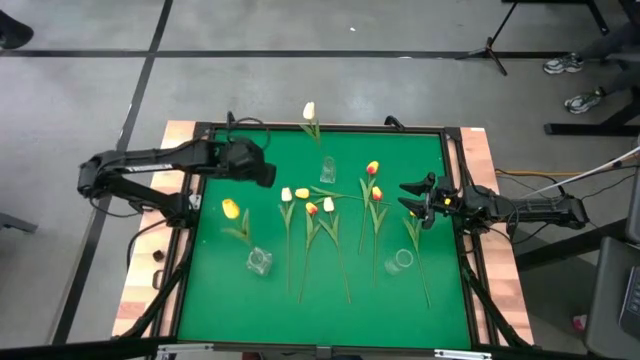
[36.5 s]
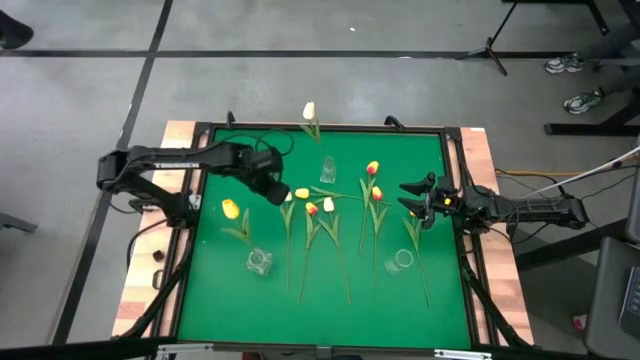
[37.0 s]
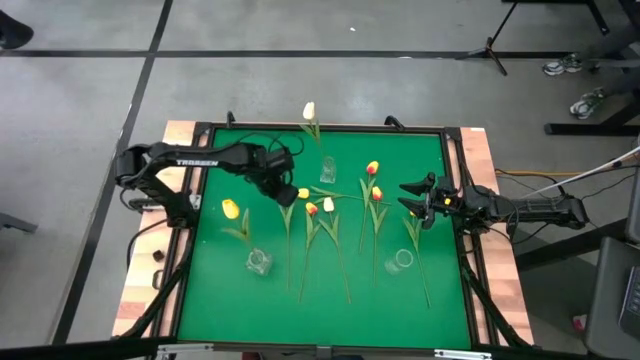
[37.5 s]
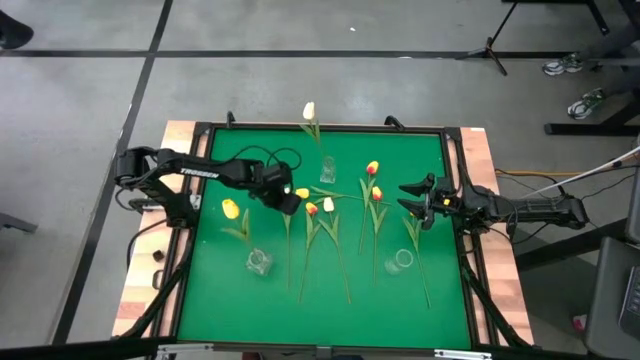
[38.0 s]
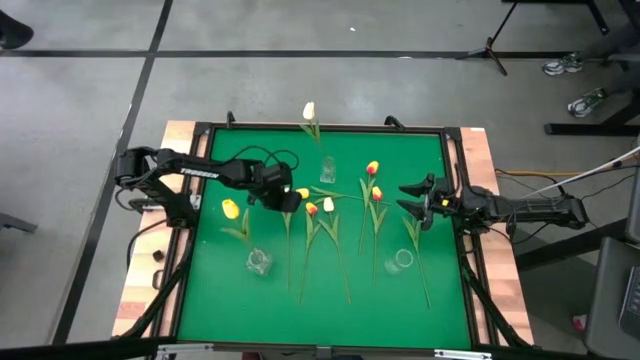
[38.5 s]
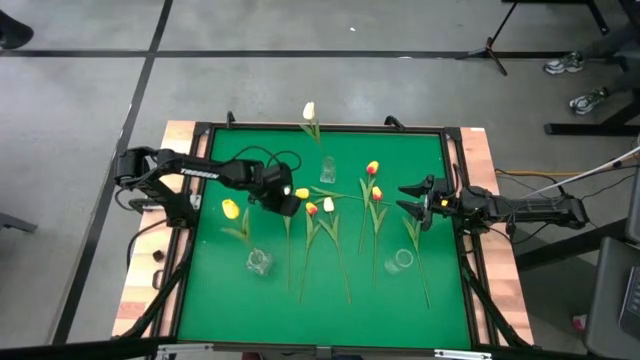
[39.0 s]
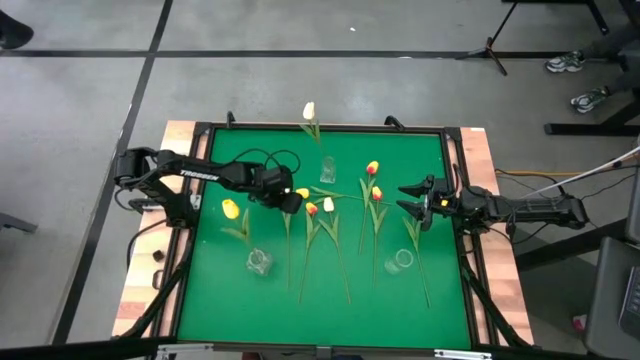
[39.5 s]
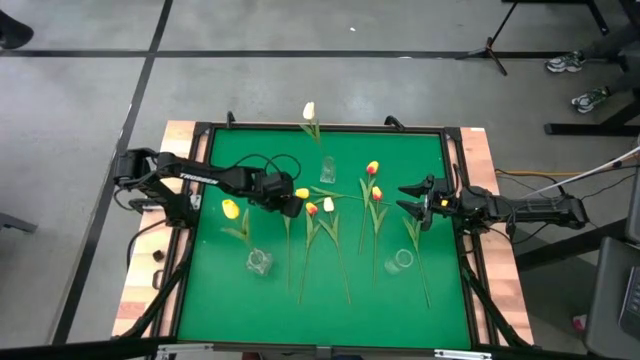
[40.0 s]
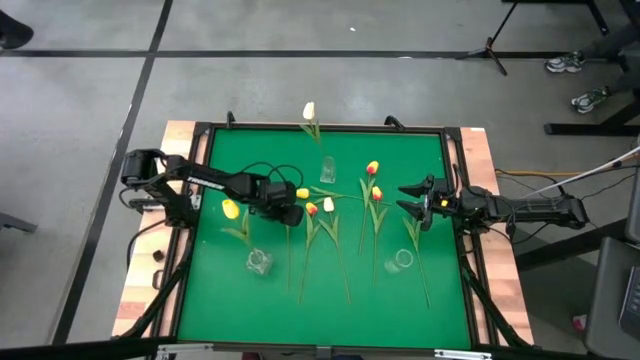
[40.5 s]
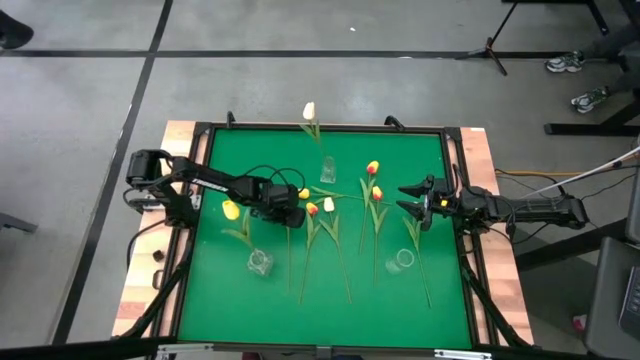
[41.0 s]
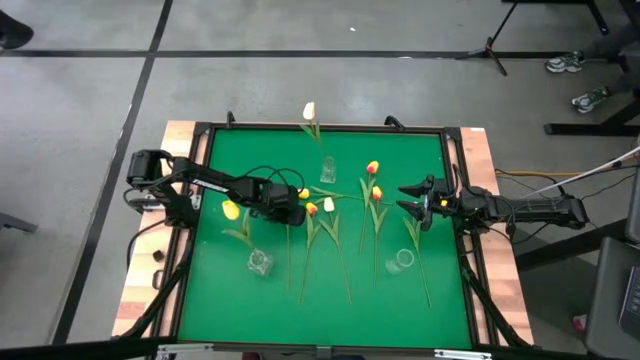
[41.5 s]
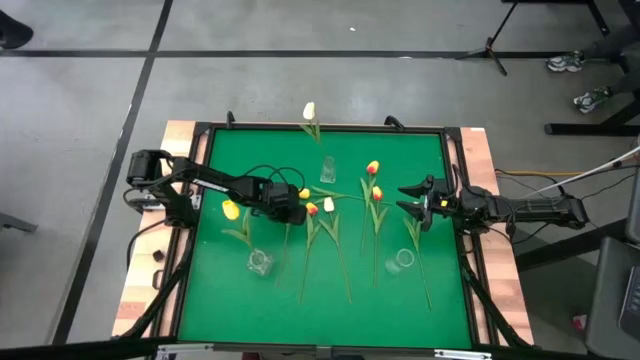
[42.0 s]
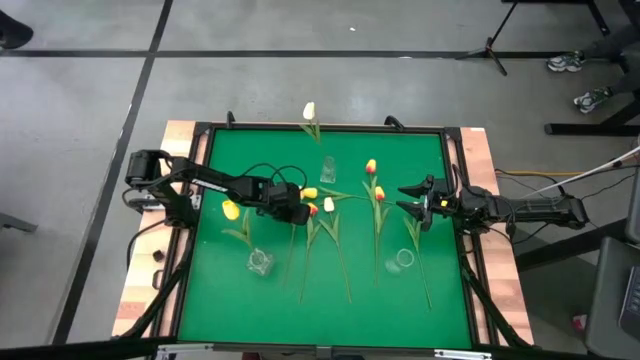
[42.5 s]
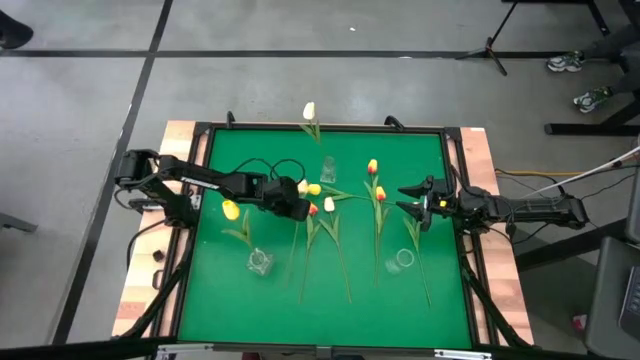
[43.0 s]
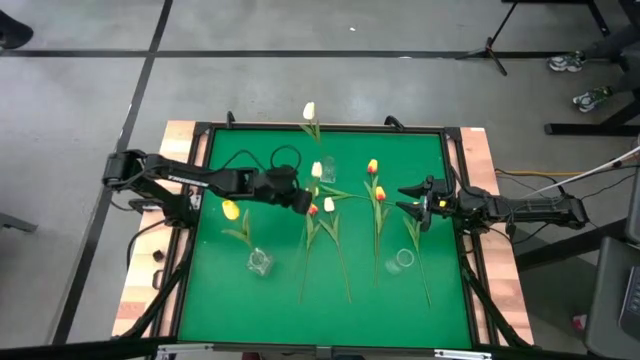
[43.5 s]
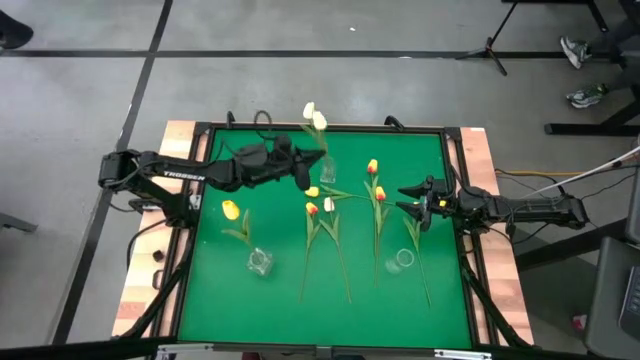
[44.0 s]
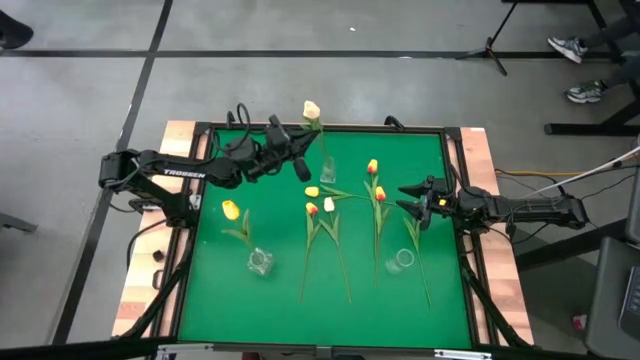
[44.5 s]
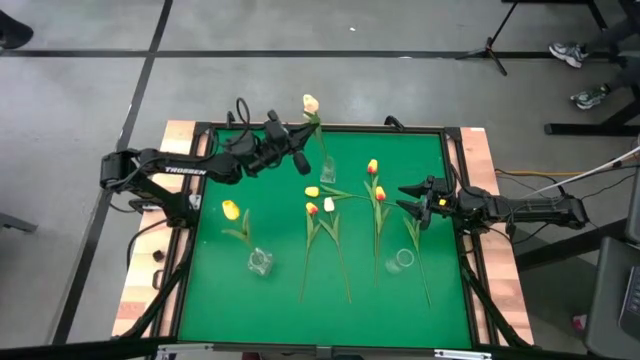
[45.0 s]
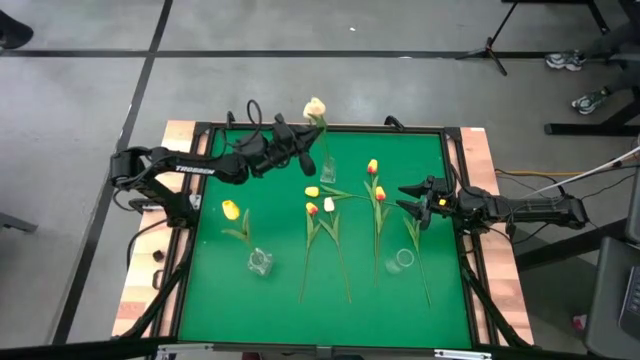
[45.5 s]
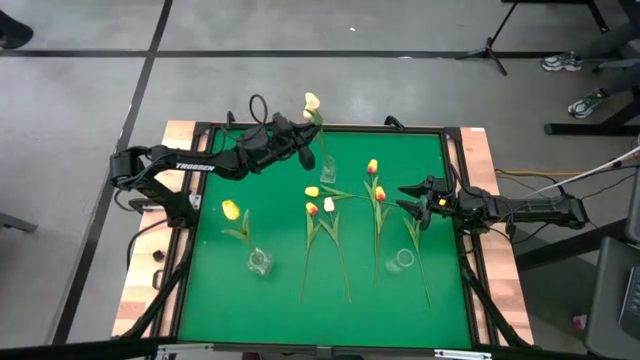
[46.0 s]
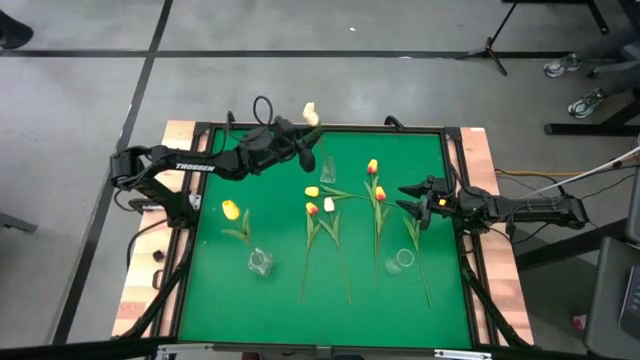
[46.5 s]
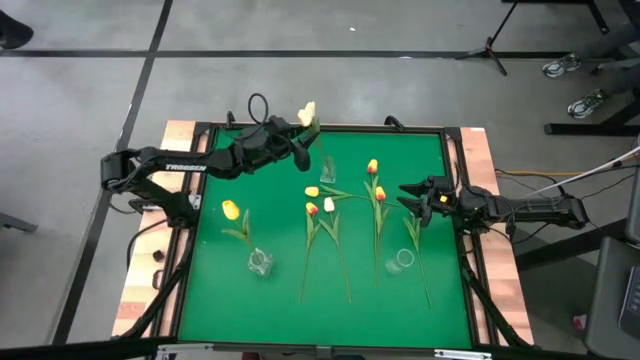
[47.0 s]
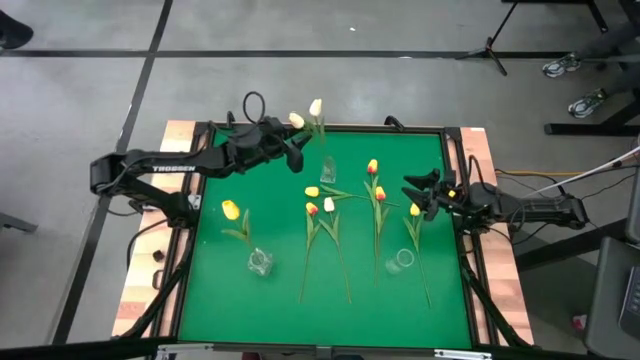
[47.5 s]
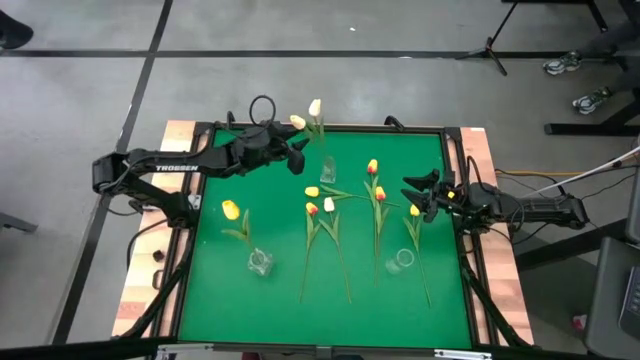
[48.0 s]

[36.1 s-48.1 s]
Task: Sort flowers into vase by color
Put the left white tulip into the top transparent vase

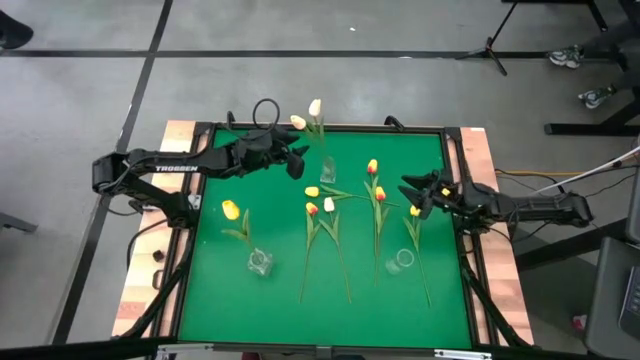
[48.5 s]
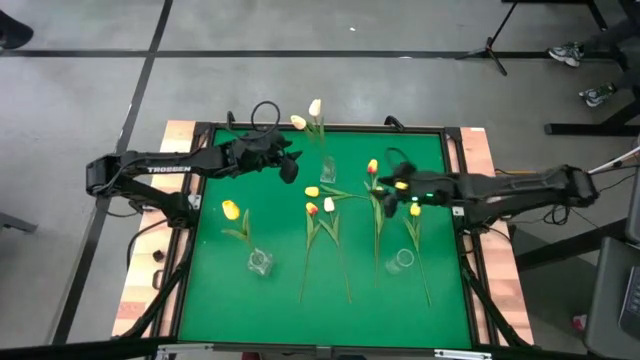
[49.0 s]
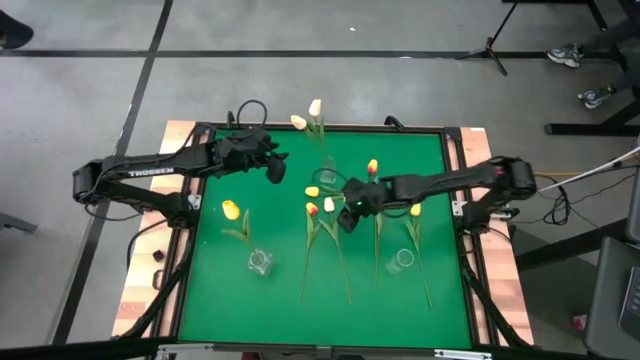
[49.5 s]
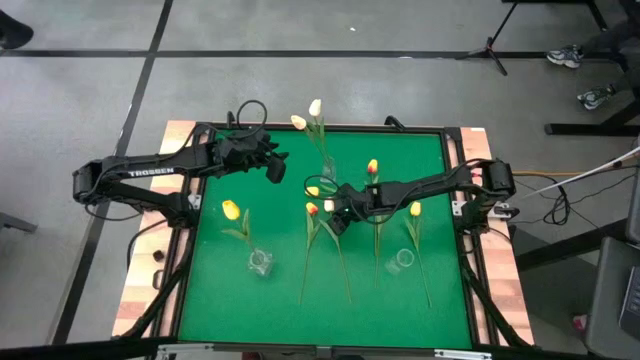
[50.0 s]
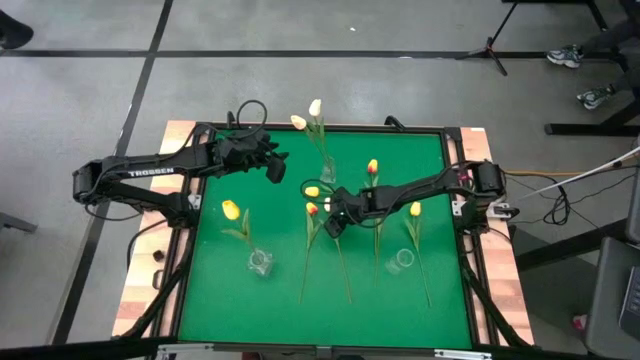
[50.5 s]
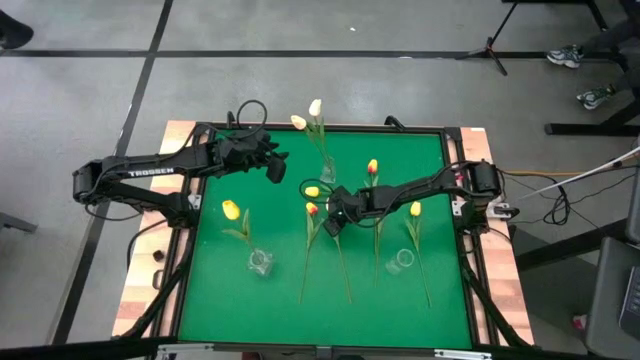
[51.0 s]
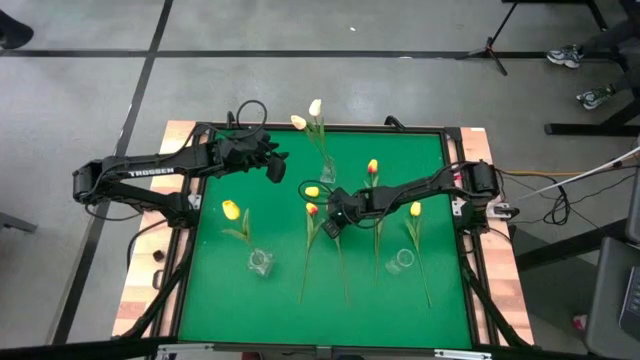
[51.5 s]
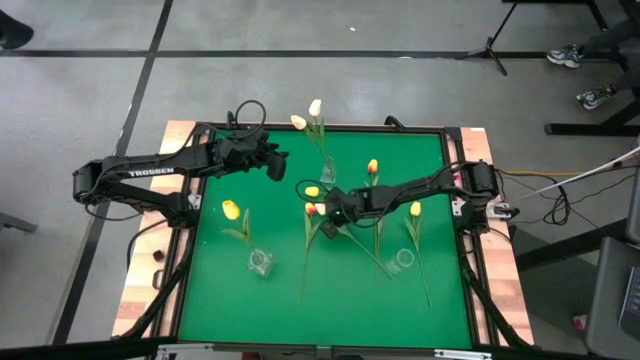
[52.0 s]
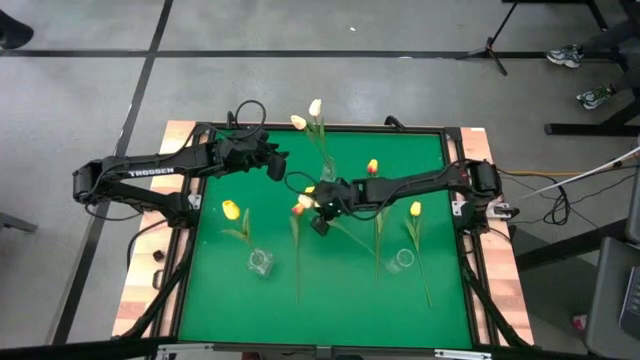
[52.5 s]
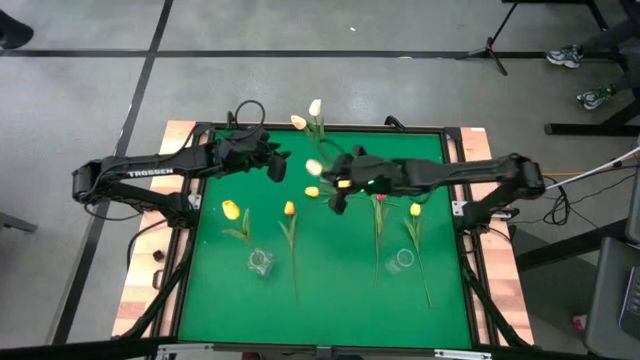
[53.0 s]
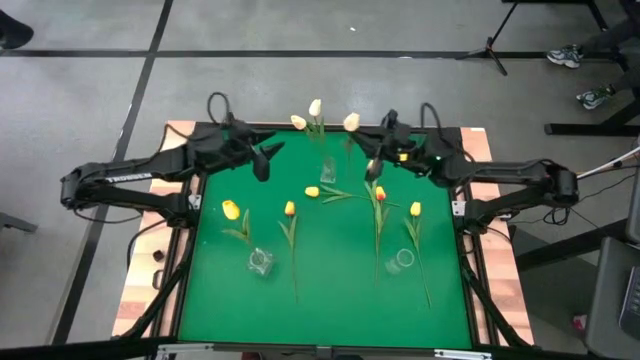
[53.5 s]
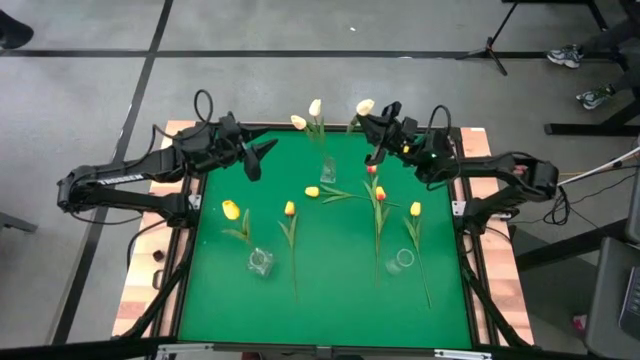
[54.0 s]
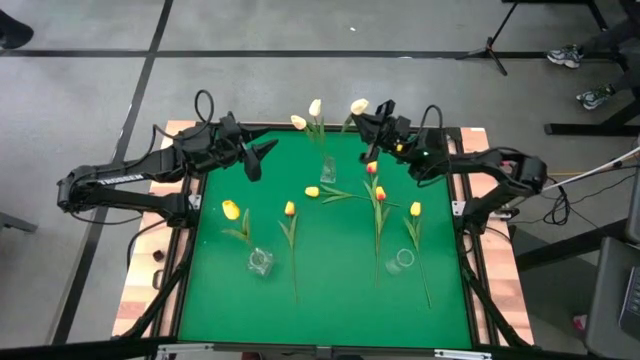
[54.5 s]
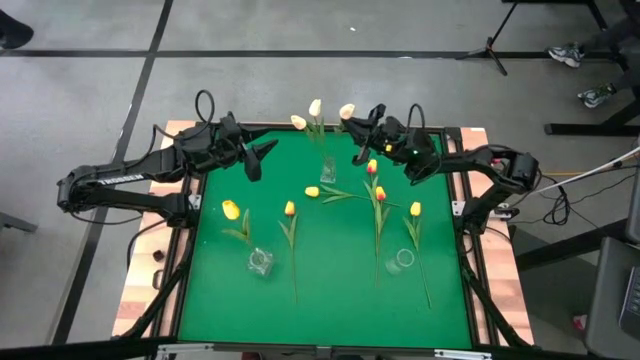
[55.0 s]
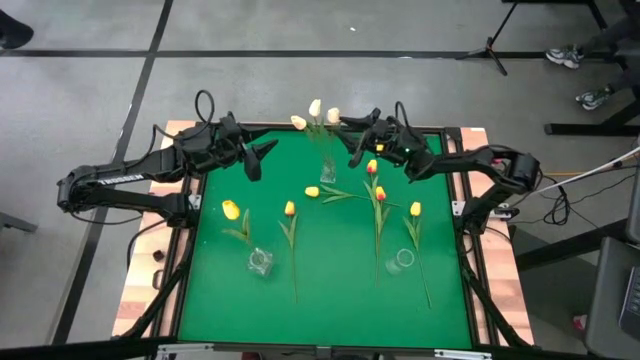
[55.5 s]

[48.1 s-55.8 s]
Put the white tulip into the top transparent vase
